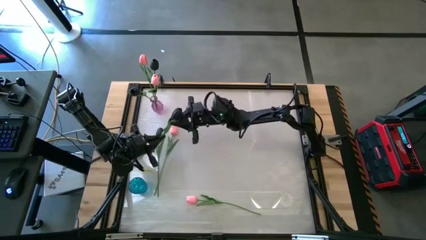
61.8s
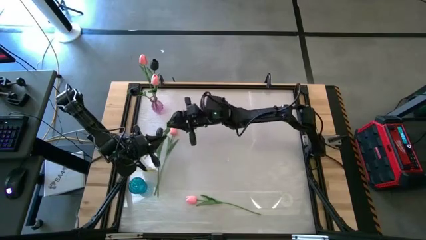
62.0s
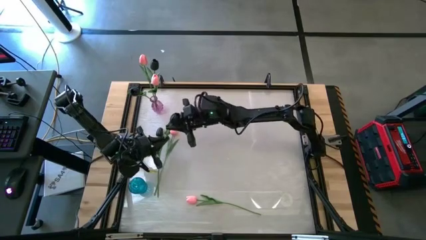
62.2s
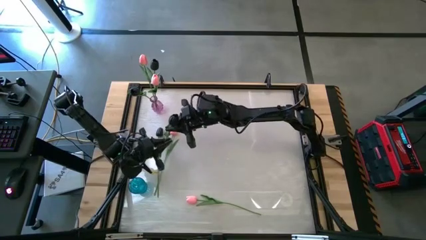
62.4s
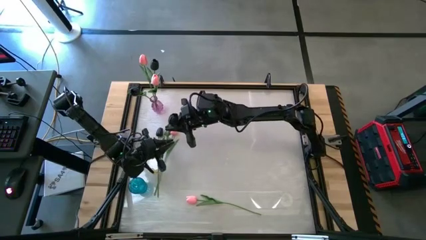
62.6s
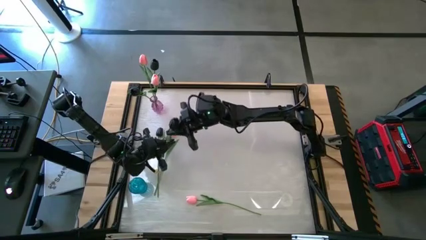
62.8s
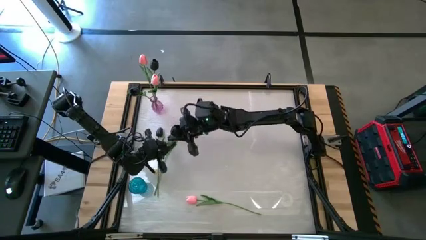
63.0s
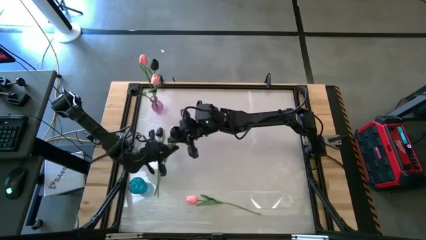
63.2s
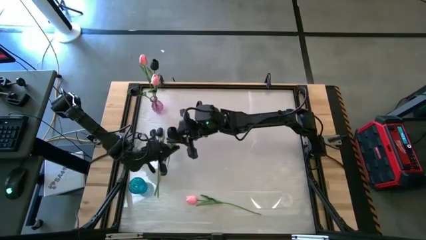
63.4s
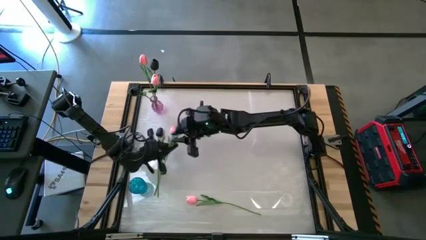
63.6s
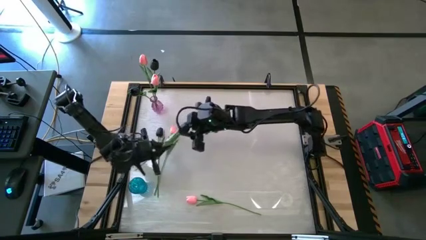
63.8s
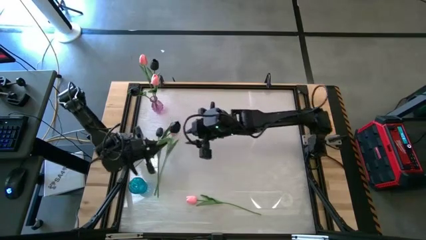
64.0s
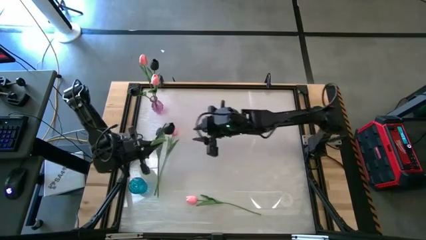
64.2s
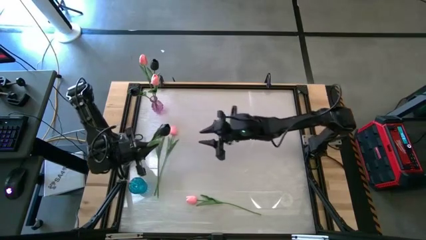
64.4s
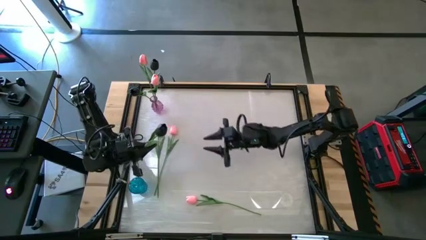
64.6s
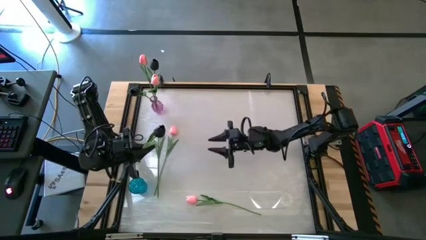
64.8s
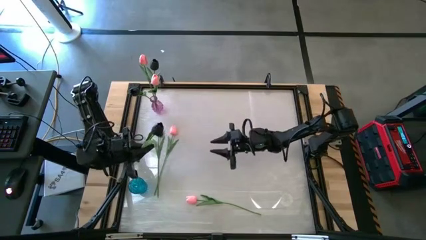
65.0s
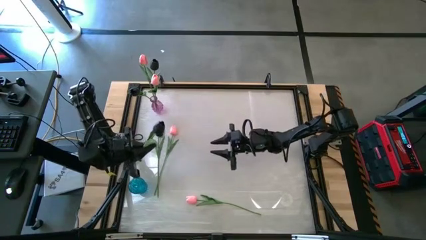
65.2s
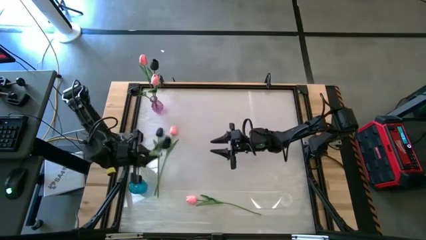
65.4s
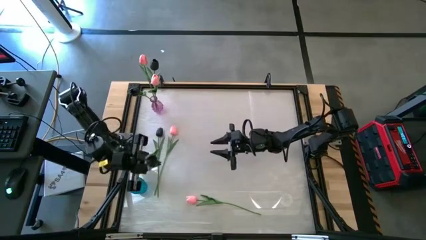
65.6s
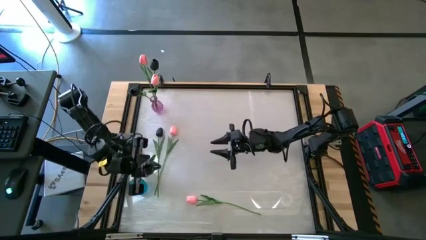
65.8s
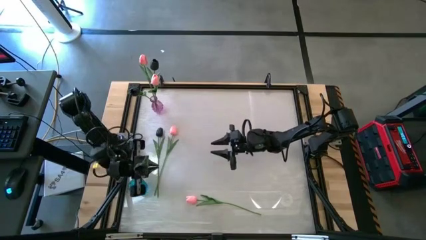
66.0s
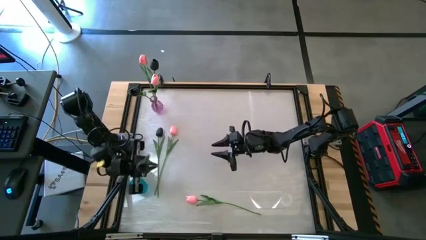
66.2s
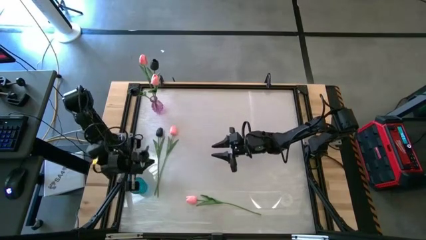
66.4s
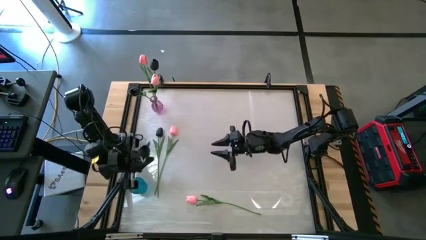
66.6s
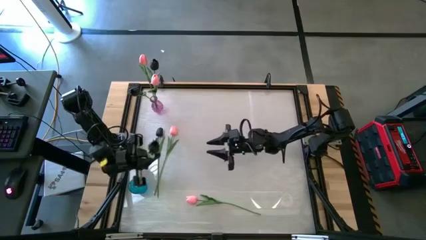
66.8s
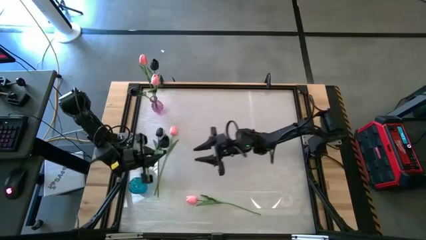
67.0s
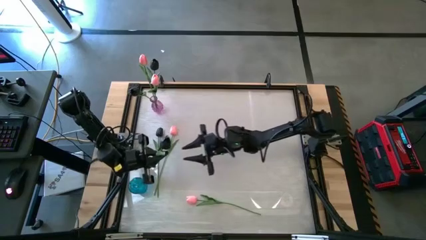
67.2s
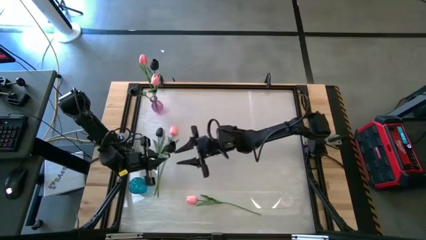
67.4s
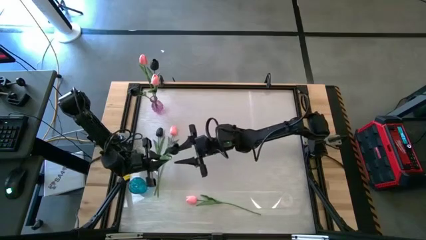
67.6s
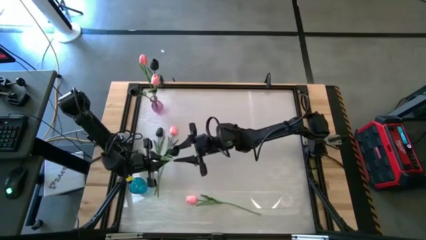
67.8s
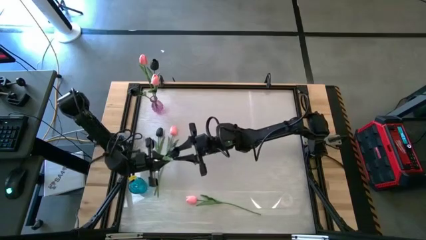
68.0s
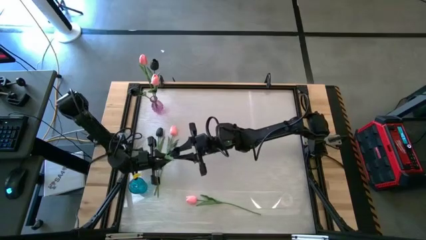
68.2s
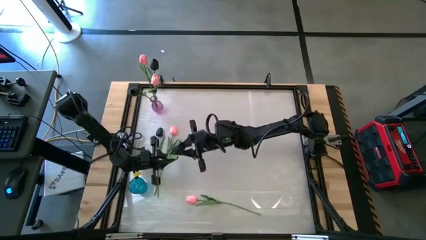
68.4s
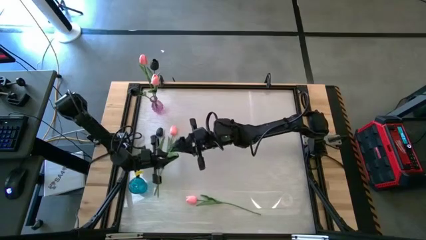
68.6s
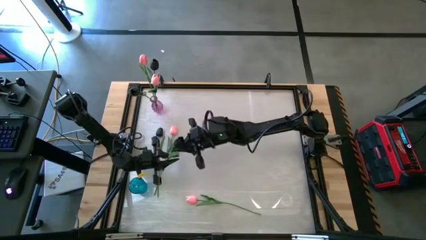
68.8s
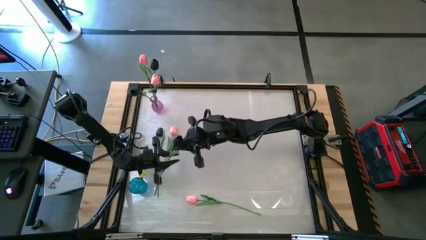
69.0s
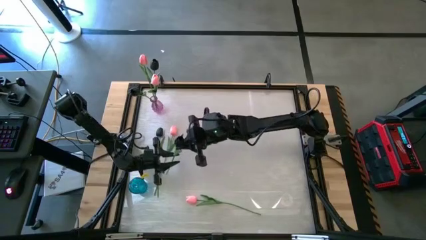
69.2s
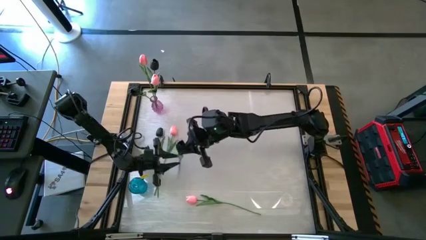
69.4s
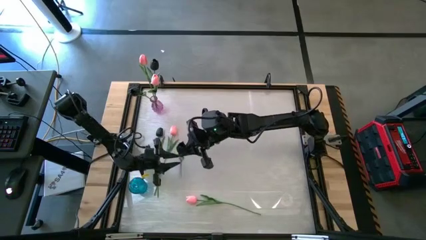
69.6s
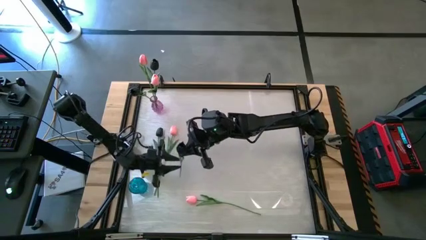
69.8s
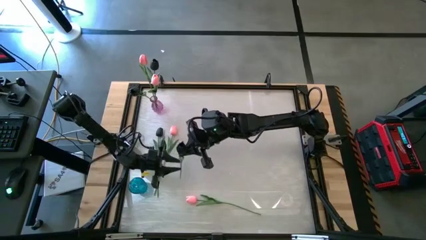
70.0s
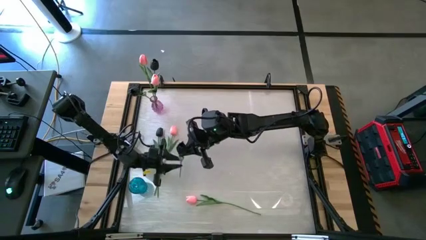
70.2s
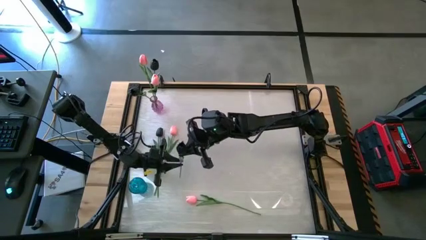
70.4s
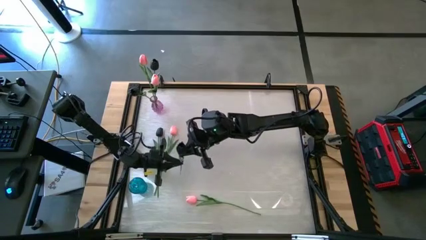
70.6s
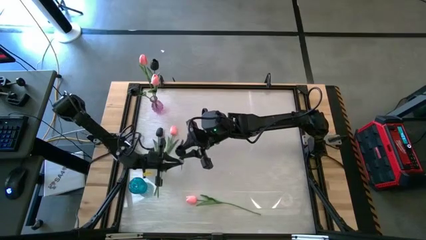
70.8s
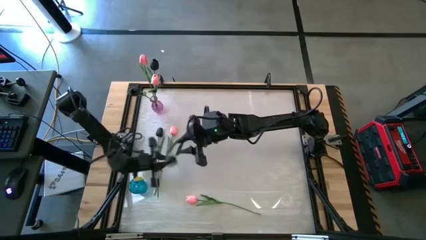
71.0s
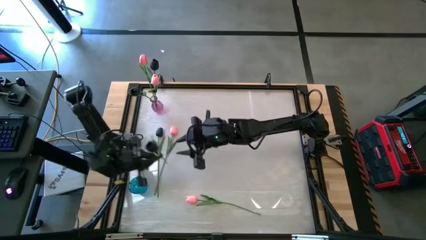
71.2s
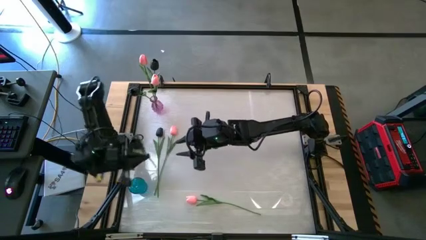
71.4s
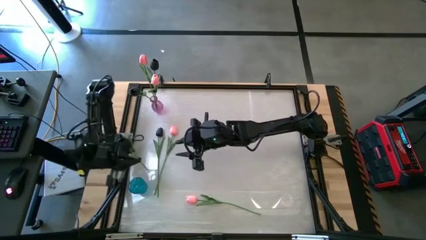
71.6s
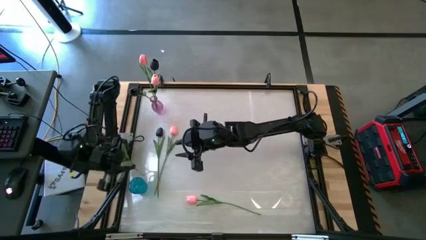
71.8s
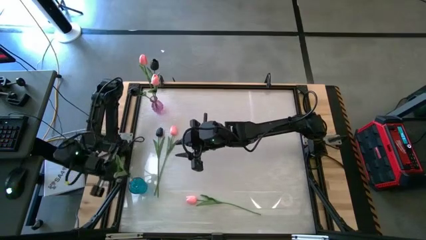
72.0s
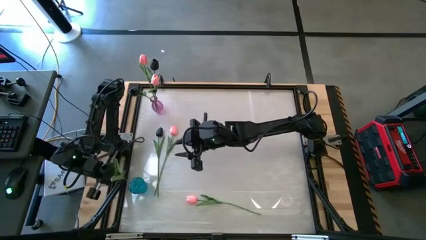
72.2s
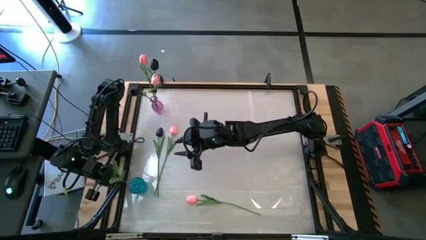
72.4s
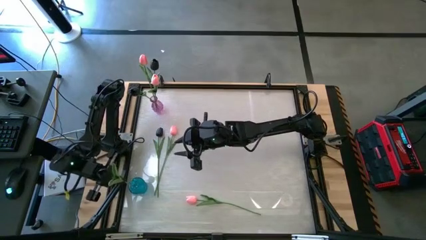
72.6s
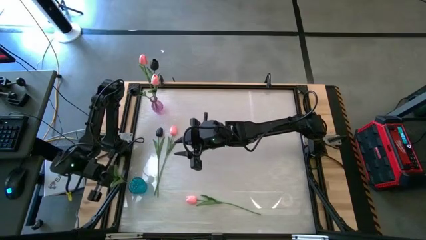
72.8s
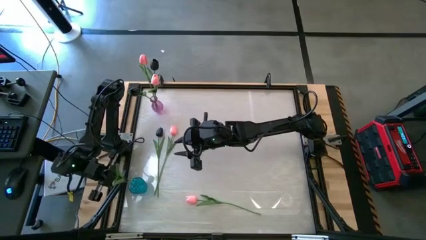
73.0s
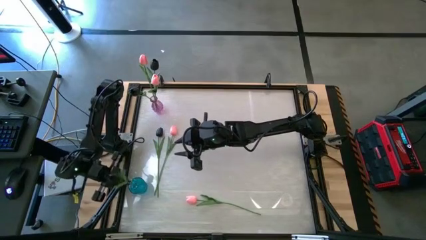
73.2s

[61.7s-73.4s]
Task: Sort flowers into vase by color
Put the black flower into the blue glass vase
